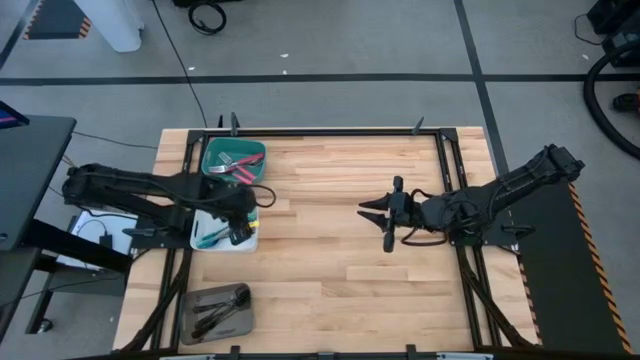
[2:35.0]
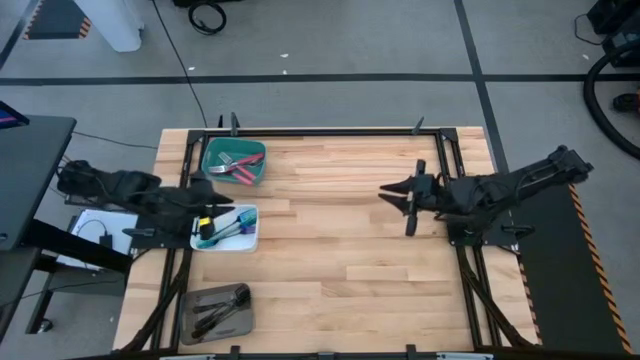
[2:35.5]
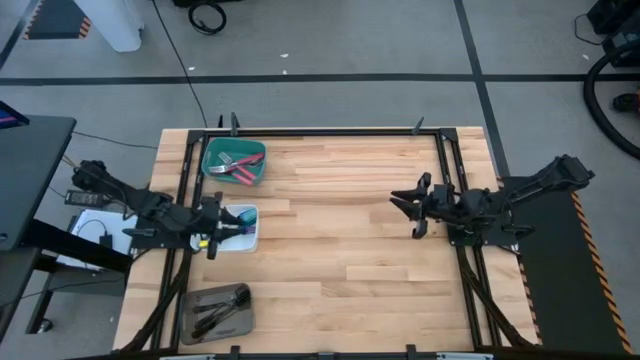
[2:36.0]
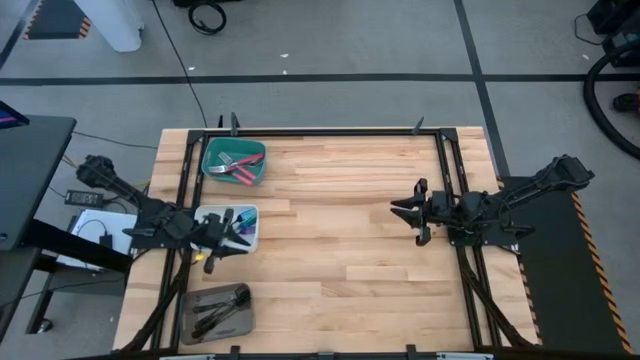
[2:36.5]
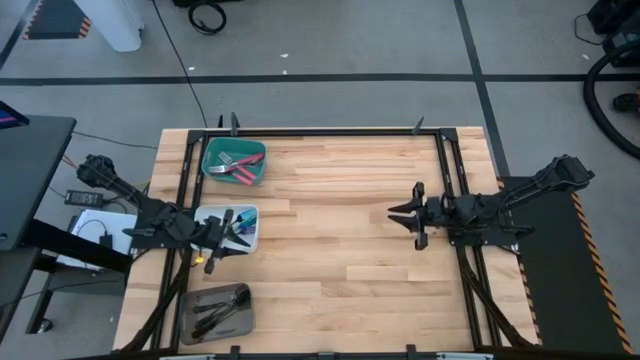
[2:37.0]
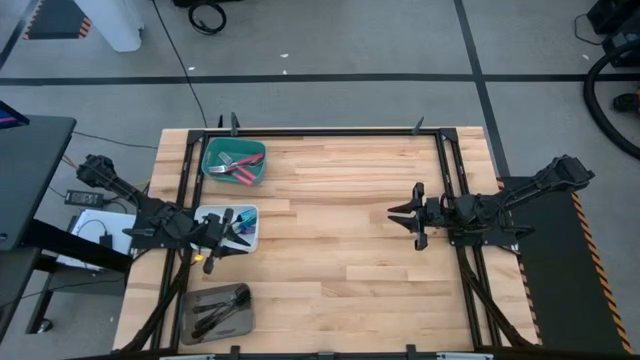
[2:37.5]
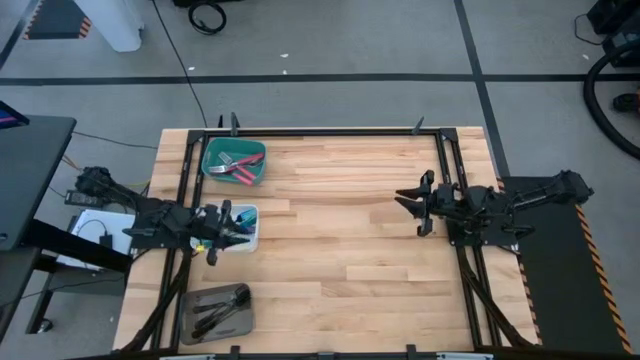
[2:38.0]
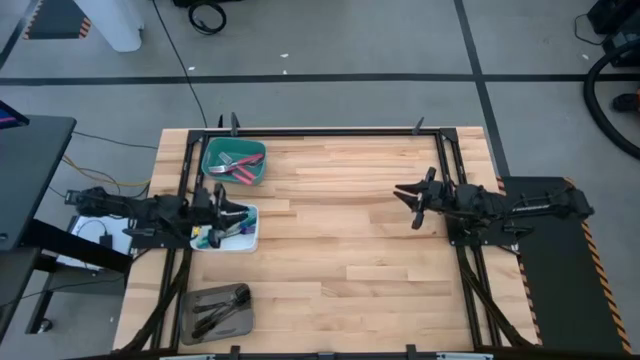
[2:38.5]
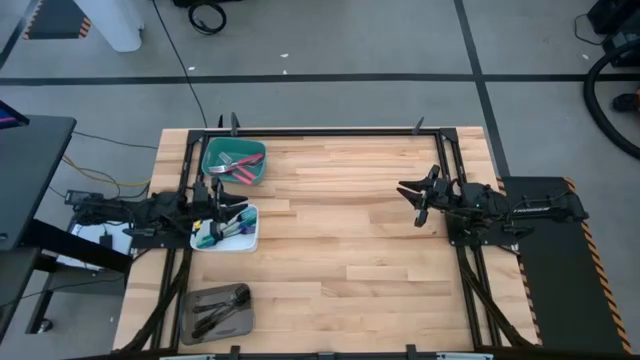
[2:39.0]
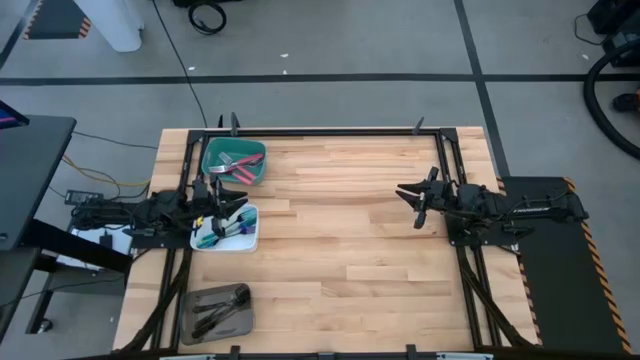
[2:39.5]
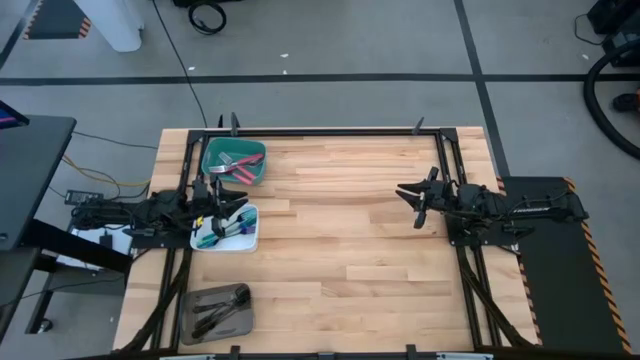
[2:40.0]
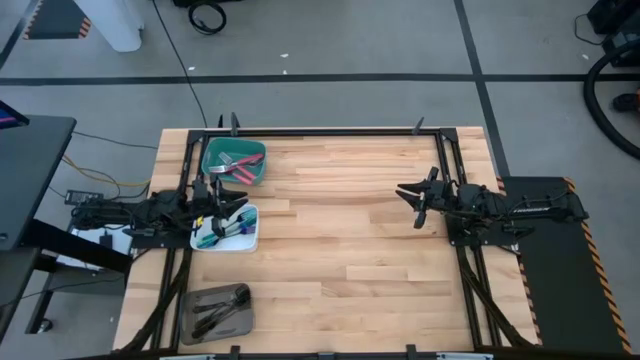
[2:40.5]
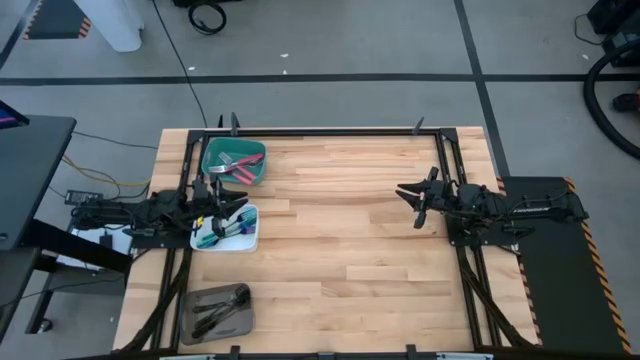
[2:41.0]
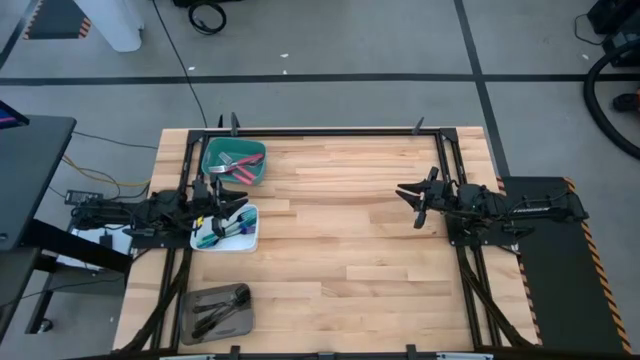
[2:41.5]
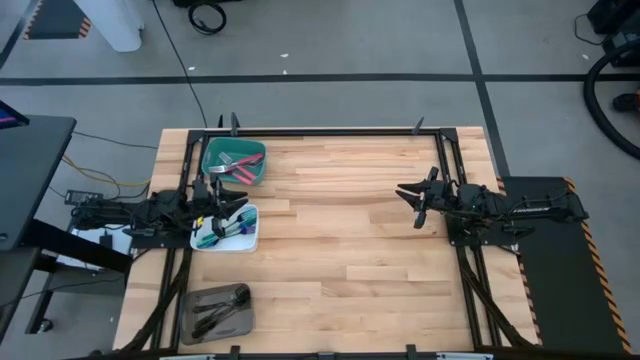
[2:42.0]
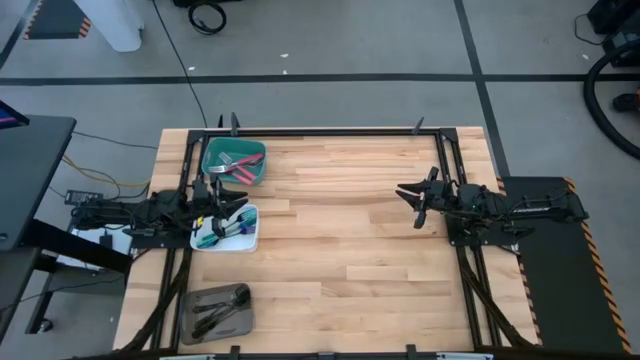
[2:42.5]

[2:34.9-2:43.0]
Task: Sort silverware by color (type)
Return to Home Position

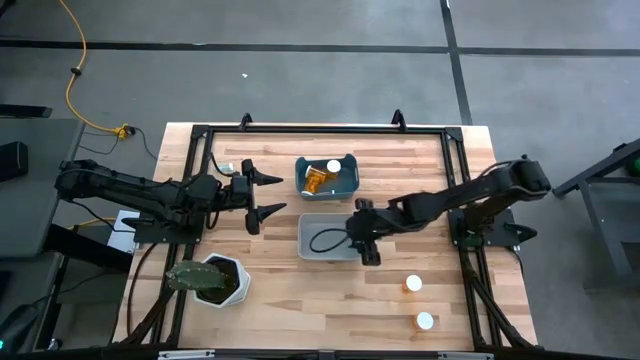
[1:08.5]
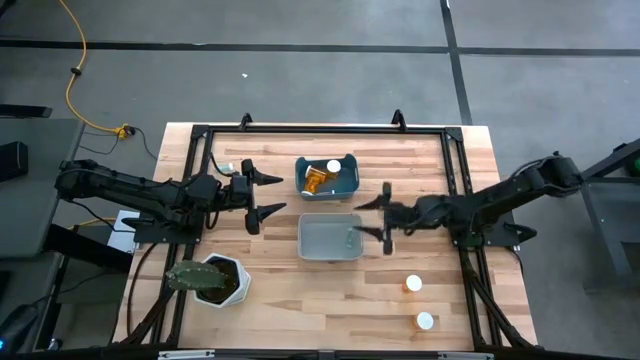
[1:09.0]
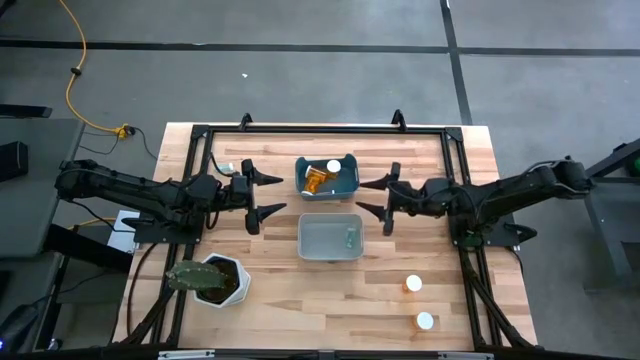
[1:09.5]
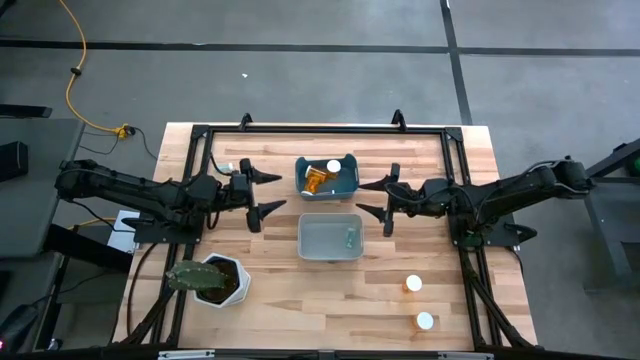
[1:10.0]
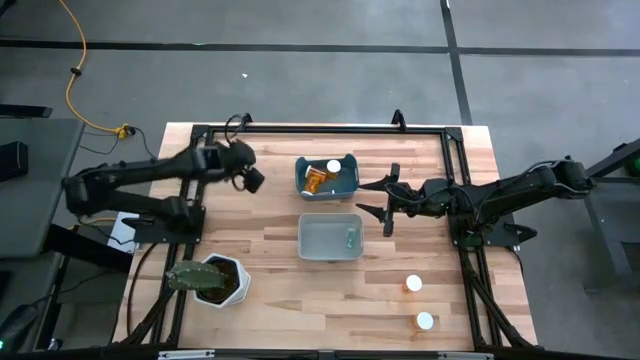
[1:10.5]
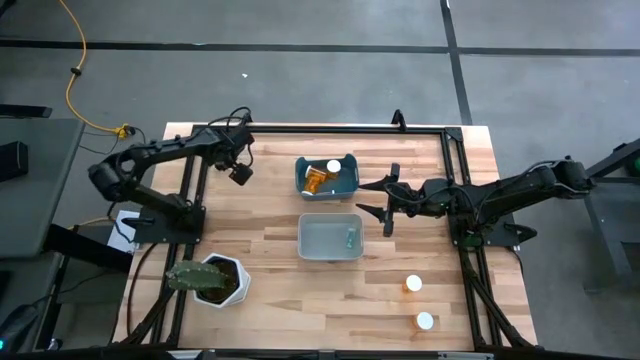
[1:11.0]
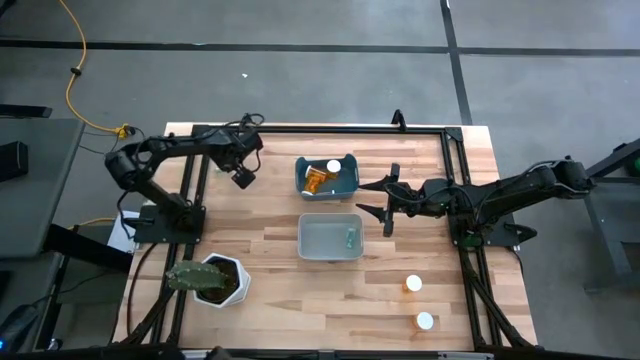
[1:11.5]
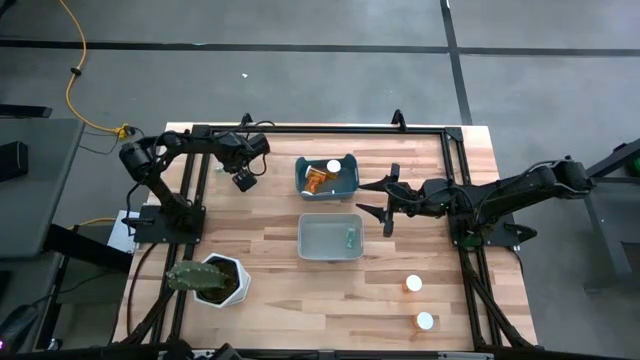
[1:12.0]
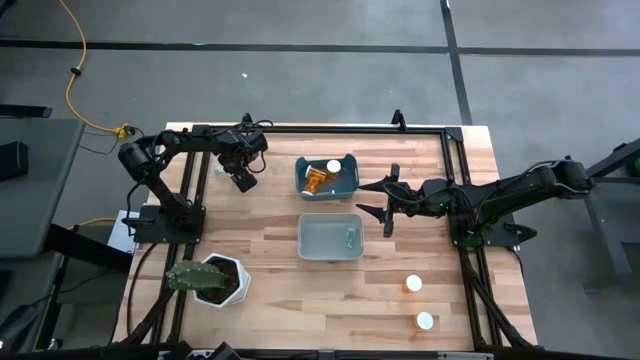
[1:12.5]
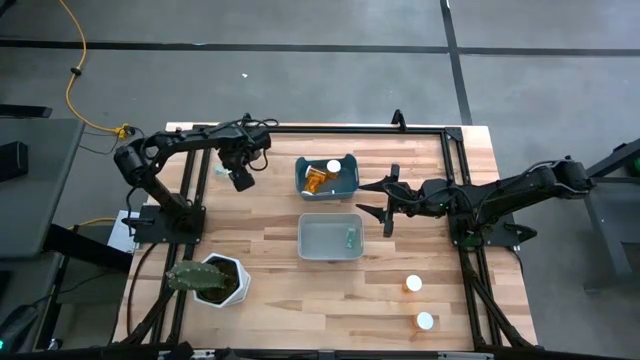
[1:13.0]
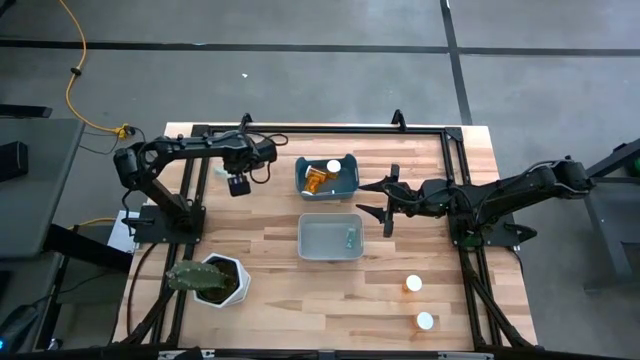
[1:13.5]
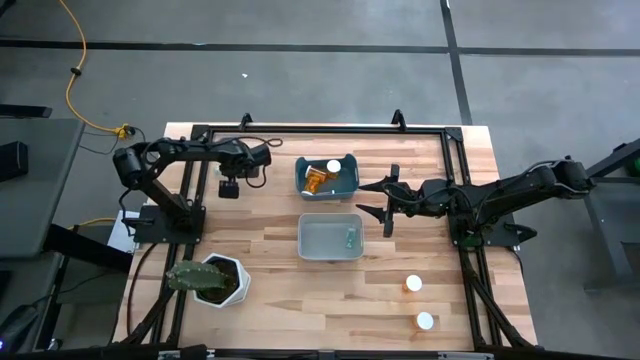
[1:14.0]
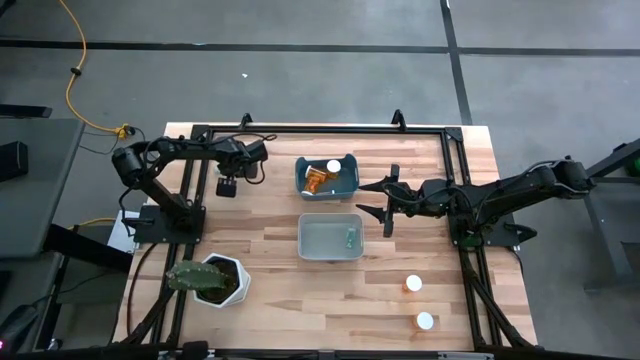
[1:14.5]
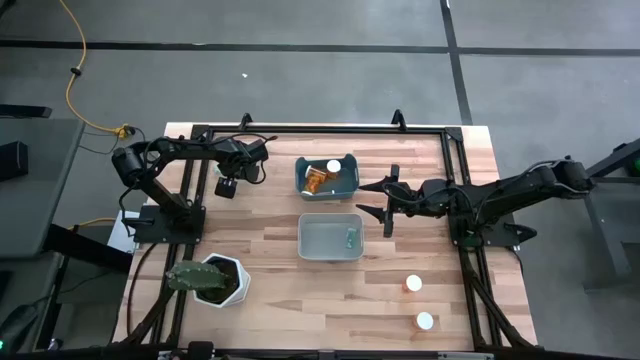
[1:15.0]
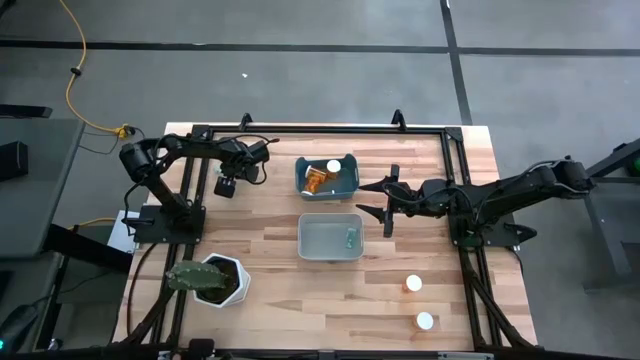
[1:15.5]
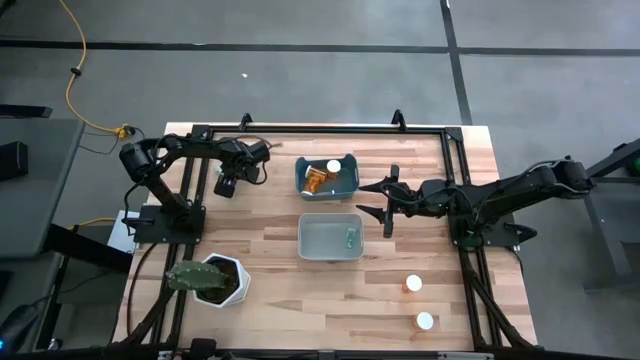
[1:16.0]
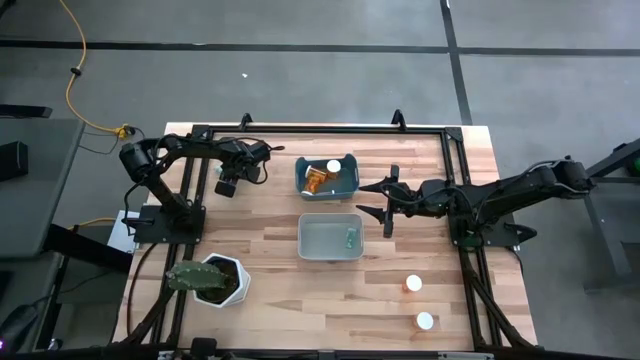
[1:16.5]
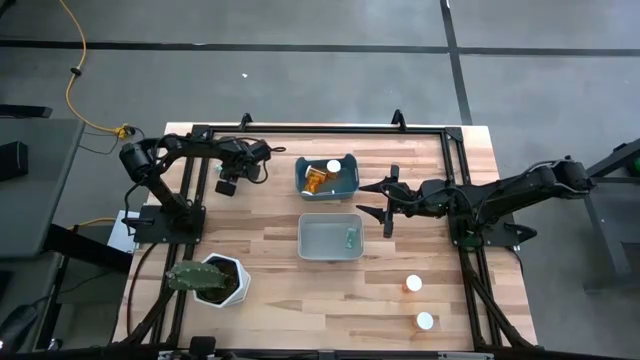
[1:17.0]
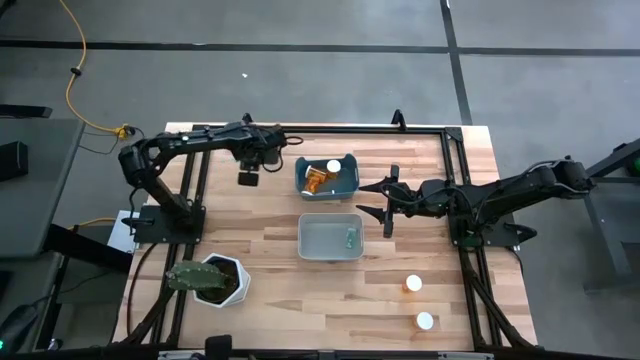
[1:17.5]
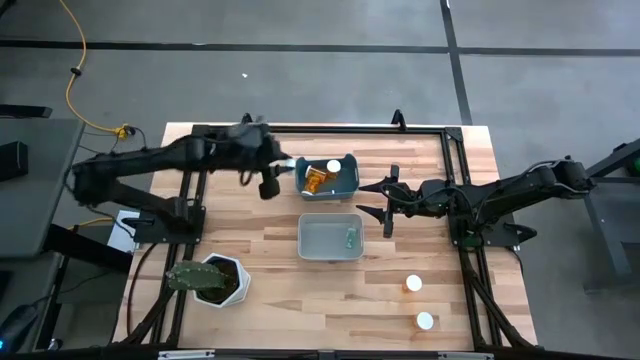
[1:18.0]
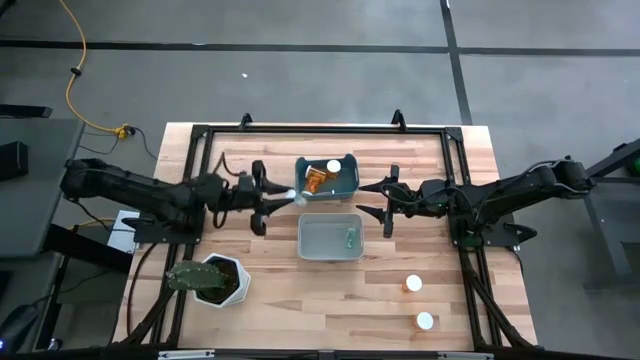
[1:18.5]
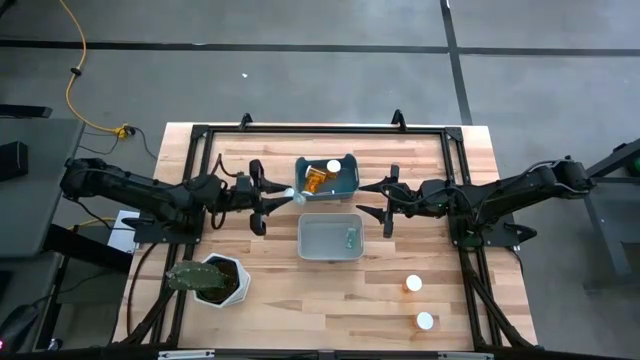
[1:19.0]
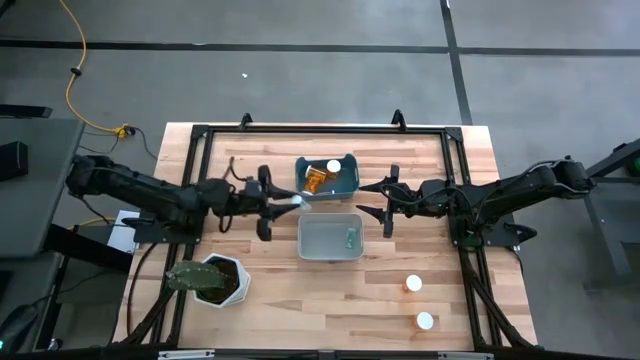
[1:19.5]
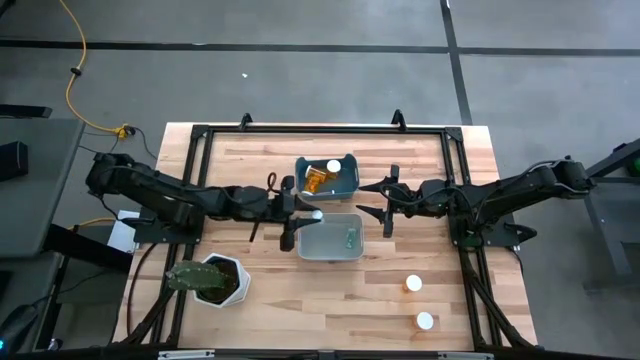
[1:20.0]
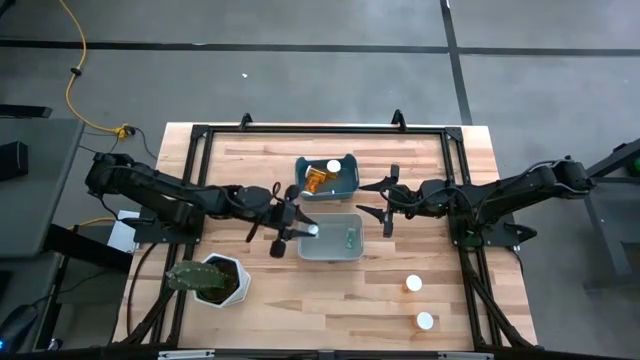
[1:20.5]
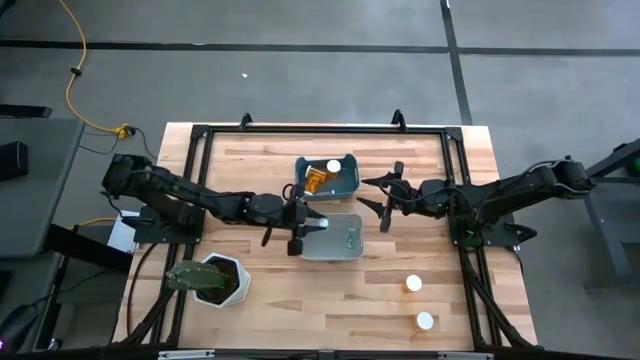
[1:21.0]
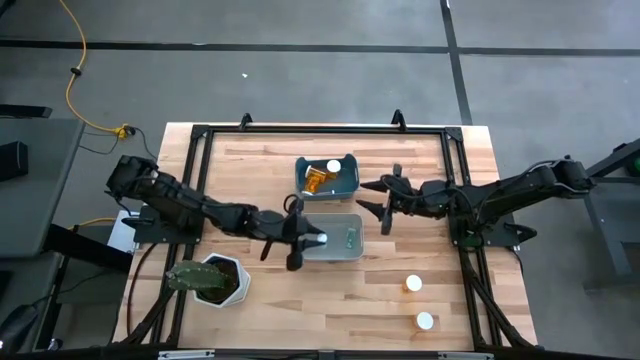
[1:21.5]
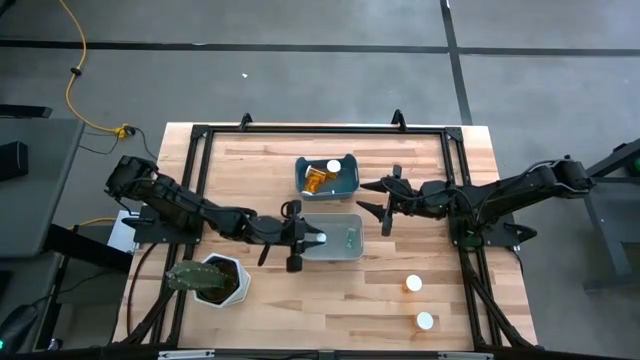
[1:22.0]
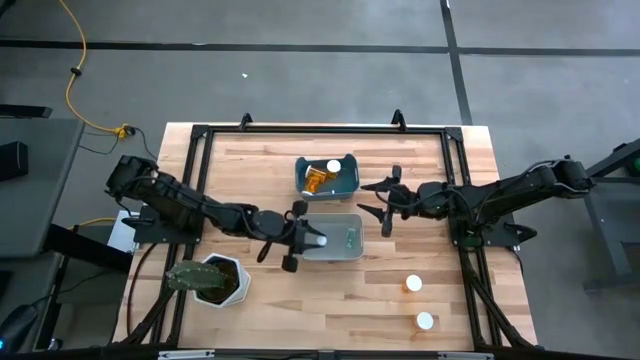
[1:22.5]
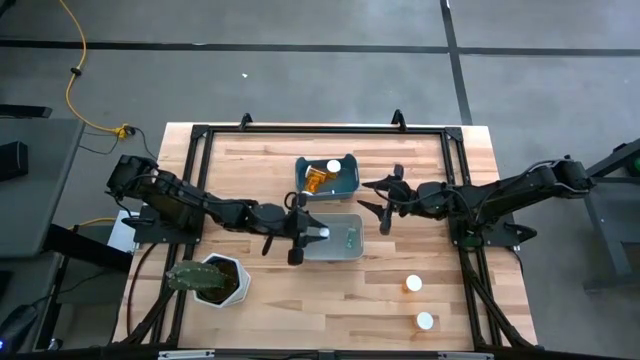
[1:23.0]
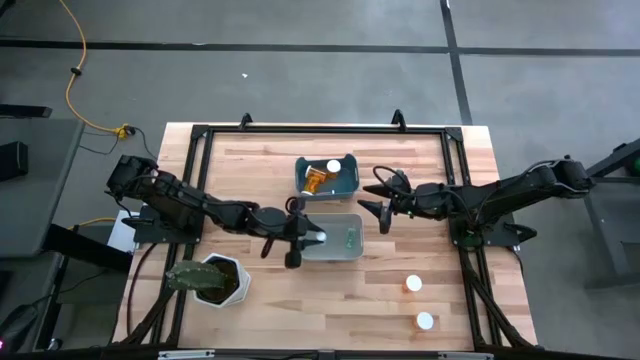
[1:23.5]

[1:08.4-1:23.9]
Task: Pick and place medicine bottles into bin by pill shape (circle, oval)
Put the green tablet bottle into the gray bin
